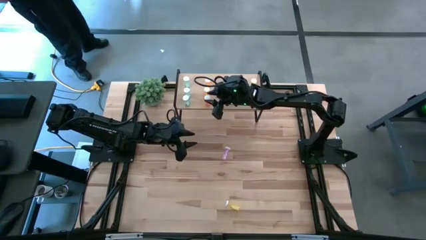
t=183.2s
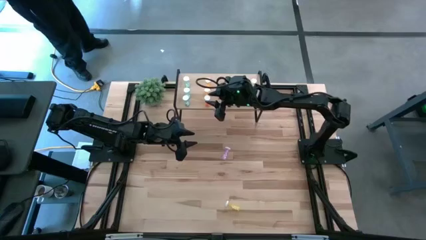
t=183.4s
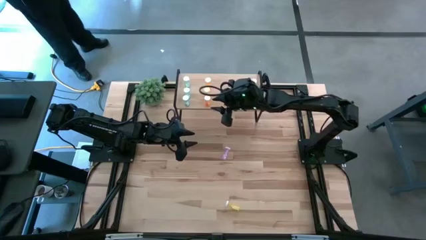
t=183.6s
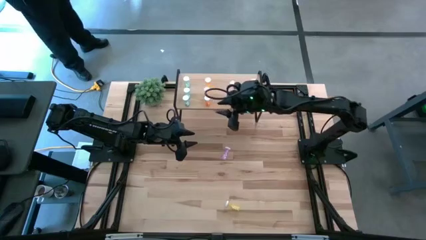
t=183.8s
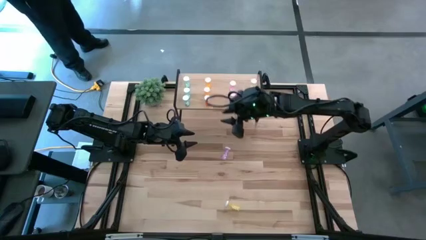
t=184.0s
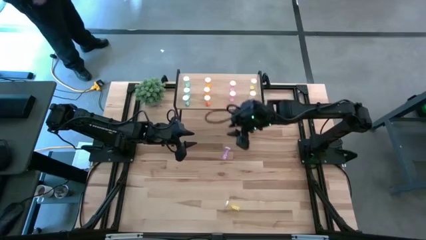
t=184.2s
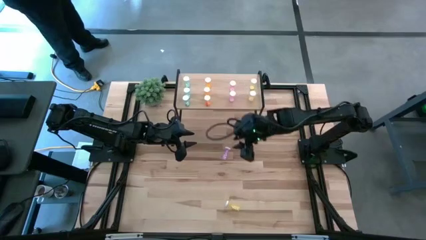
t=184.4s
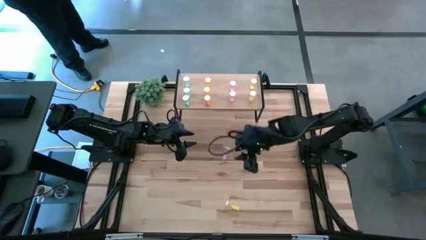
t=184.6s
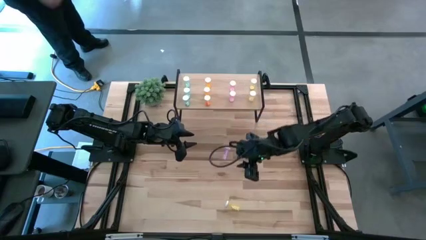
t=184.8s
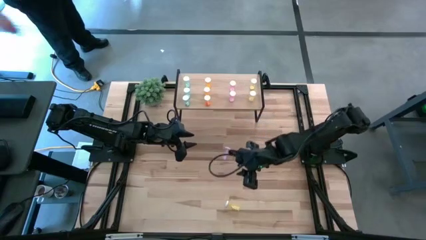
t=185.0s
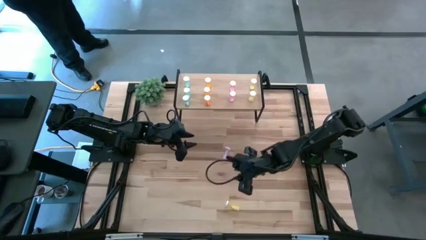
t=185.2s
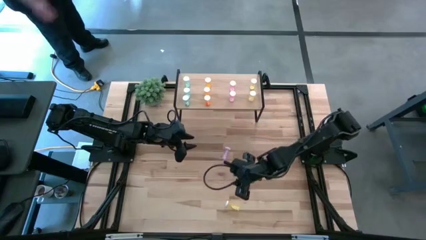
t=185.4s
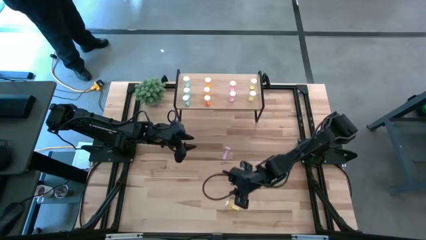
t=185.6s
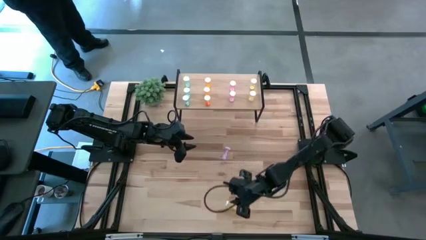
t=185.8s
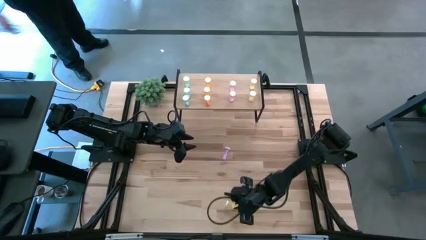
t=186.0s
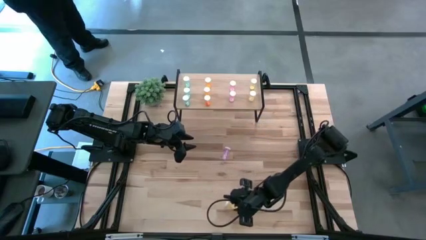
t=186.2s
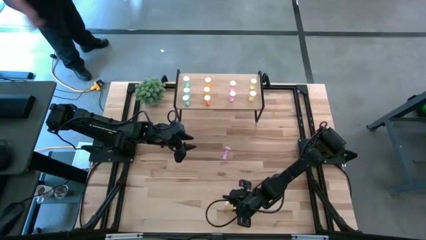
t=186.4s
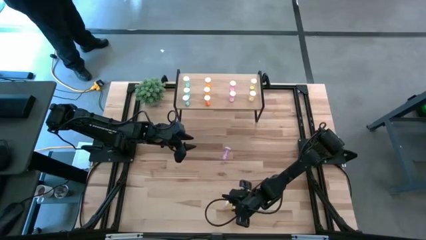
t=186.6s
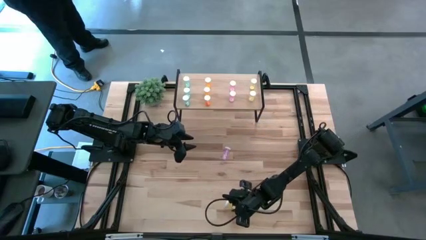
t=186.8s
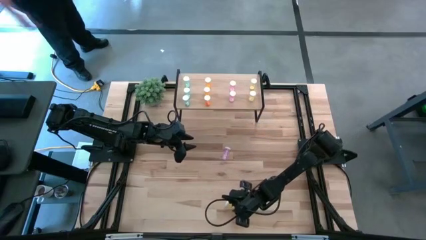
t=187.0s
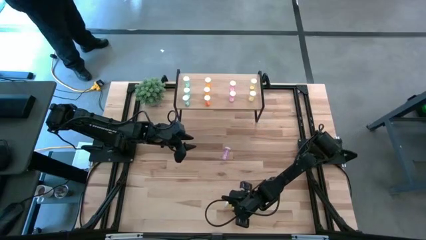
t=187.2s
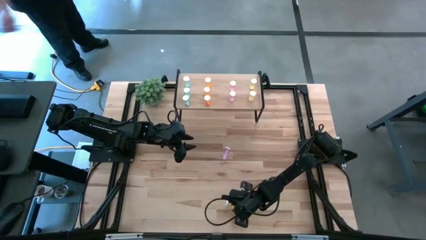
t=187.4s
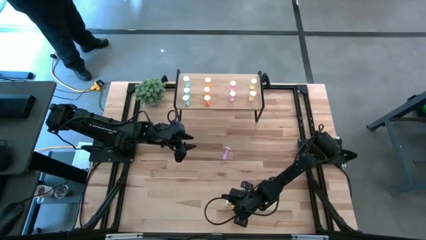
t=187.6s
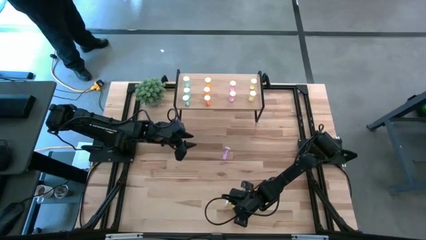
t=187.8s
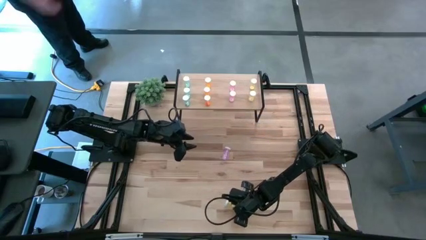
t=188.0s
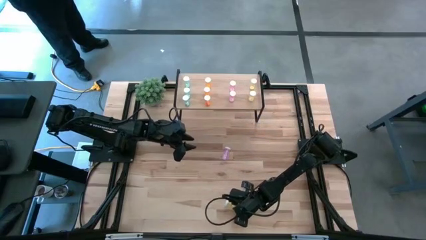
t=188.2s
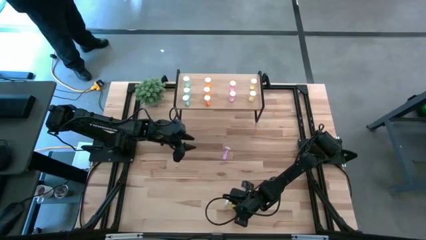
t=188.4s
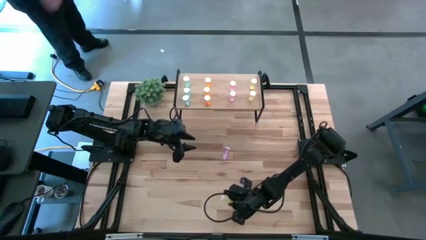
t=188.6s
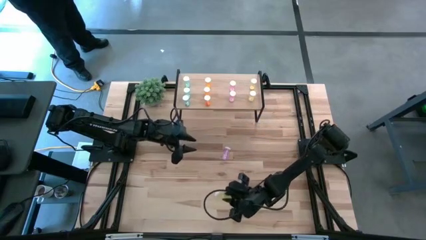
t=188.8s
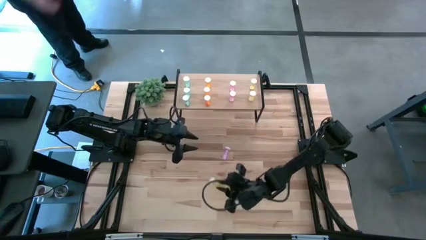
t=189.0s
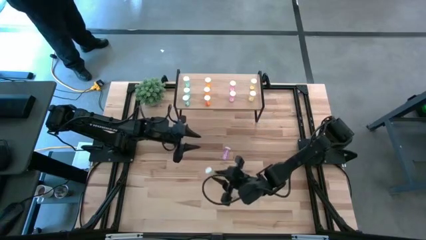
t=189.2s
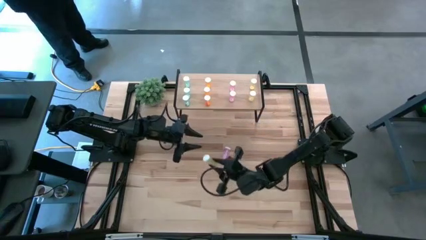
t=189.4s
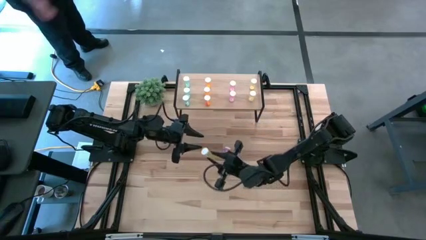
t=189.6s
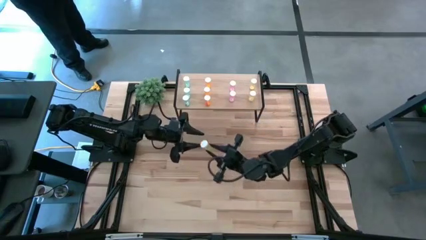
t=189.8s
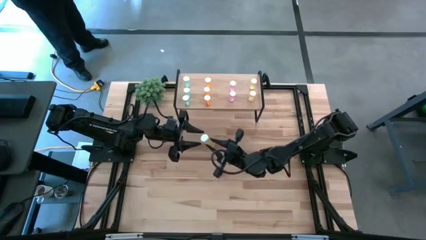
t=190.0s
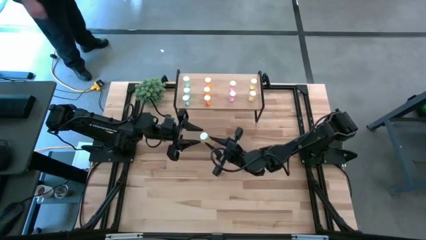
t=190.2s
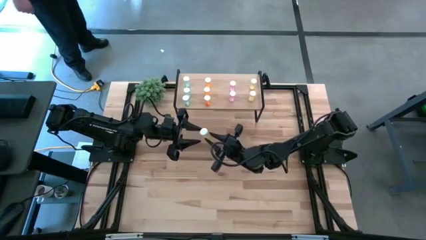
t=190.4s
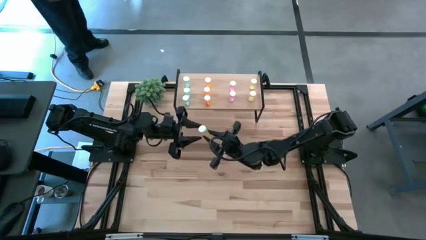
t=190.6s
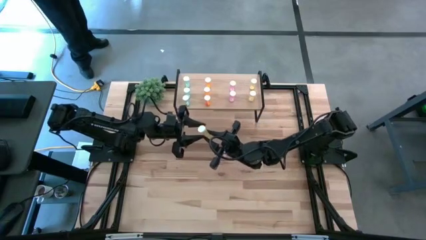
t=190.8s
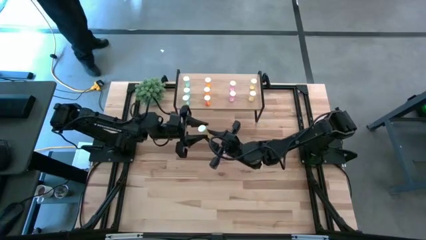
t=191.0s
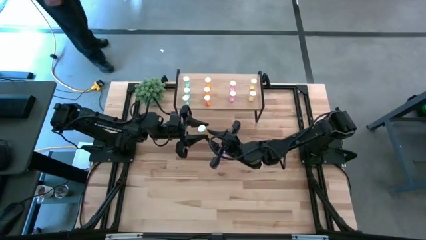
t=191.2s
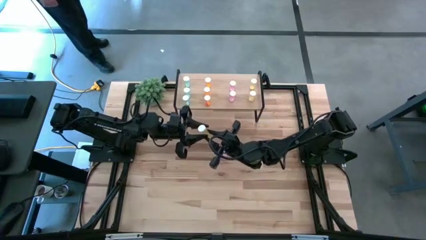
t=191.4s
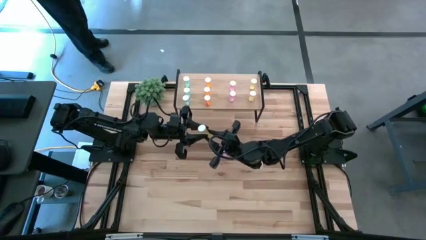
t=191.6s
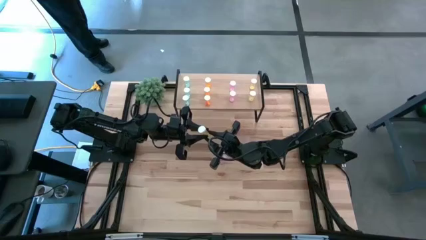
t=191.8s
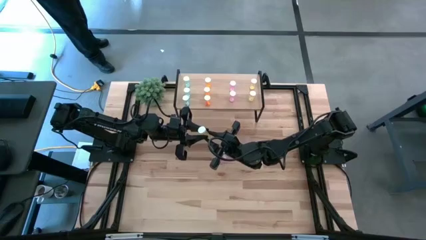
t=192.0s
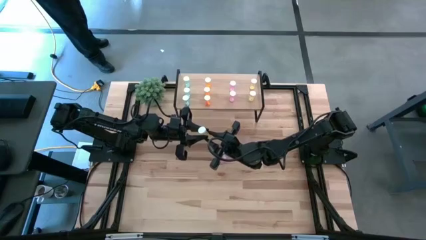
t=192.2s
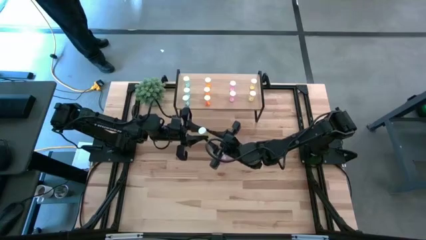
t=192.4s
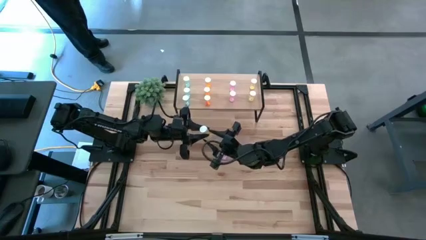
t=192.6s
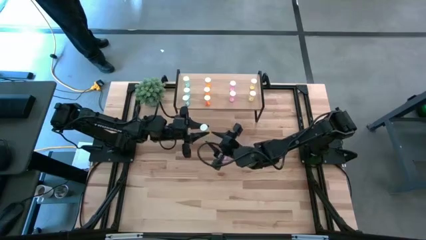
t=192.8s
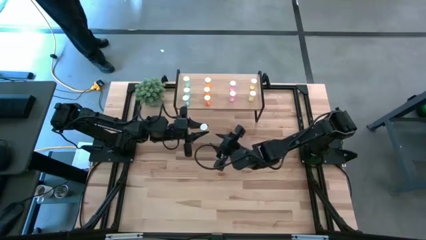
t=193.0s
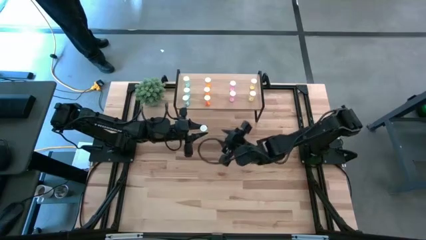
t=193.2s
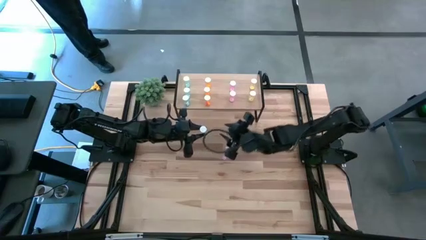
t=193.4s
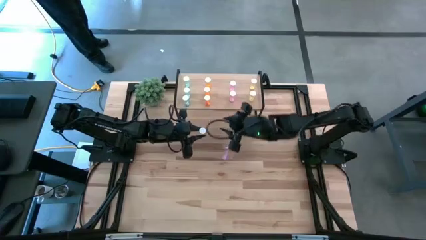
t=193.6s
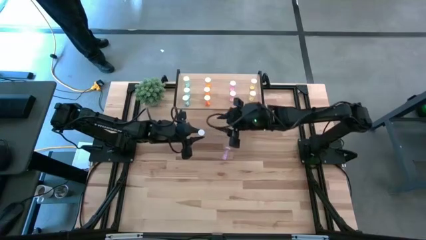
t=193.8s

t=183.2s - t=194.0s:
Task: Pick and place medicine bottles onto shelf by color
Put the yellow pill bottle on the shelf aligned with the yellow pill bottle

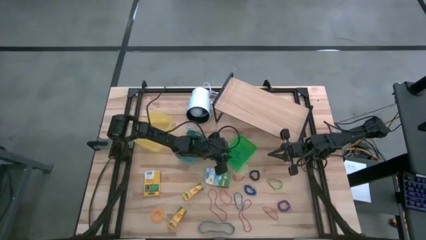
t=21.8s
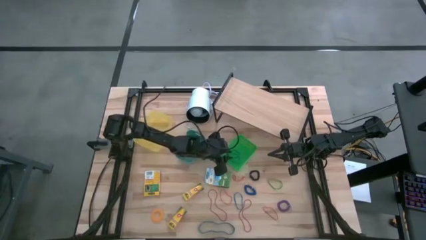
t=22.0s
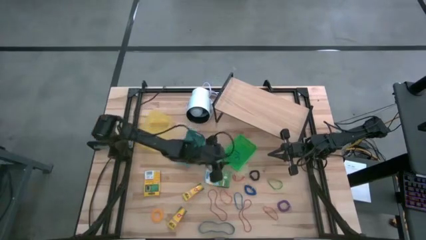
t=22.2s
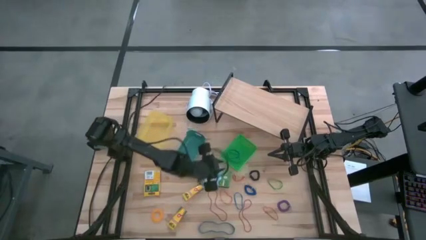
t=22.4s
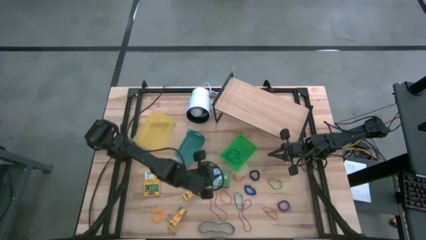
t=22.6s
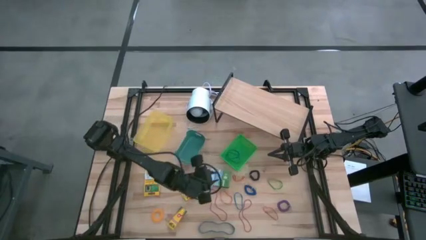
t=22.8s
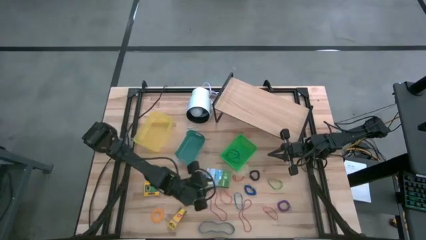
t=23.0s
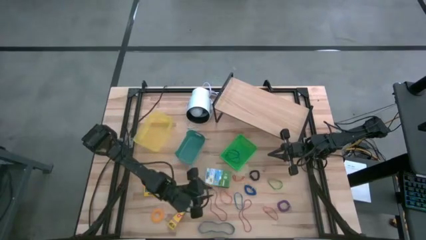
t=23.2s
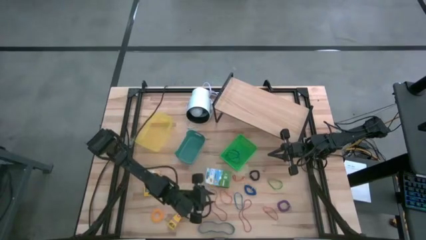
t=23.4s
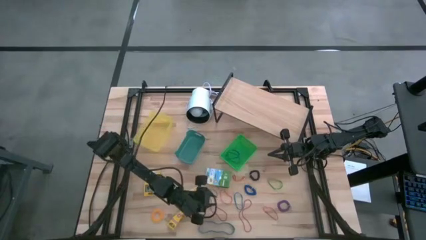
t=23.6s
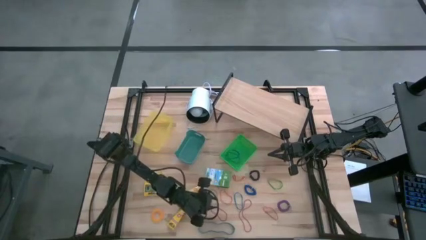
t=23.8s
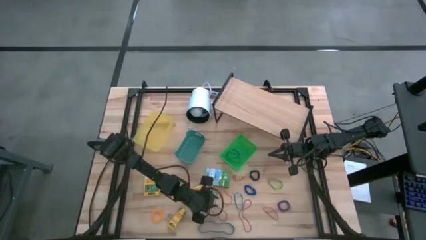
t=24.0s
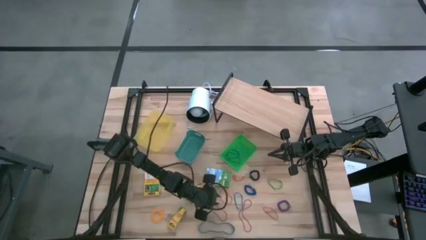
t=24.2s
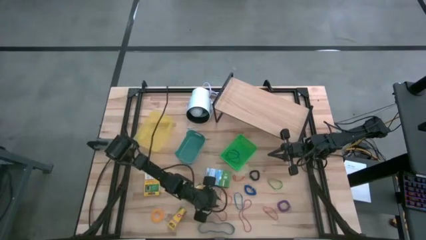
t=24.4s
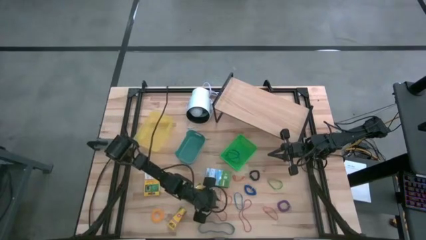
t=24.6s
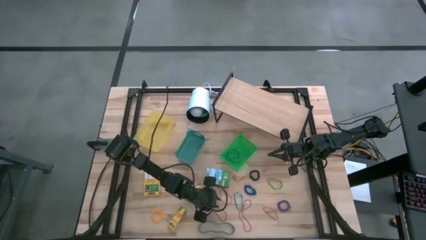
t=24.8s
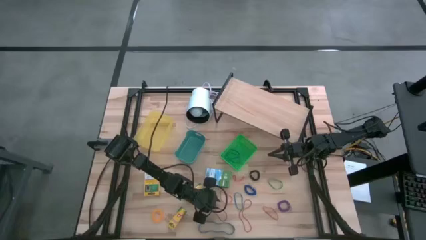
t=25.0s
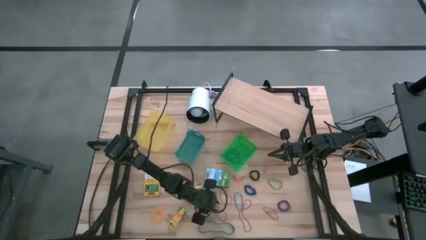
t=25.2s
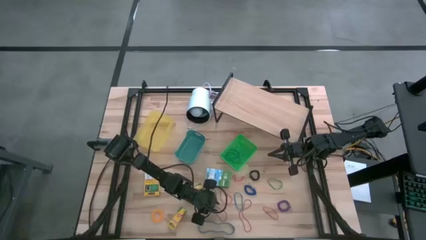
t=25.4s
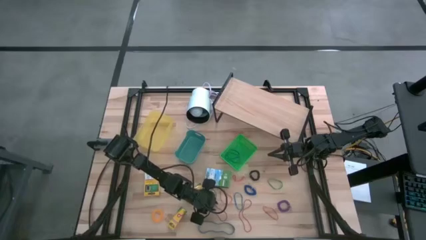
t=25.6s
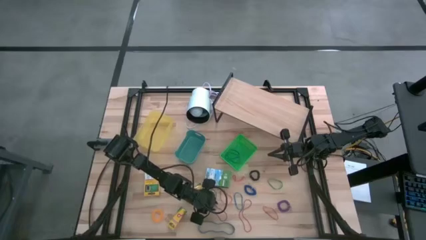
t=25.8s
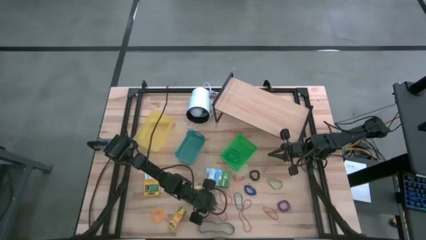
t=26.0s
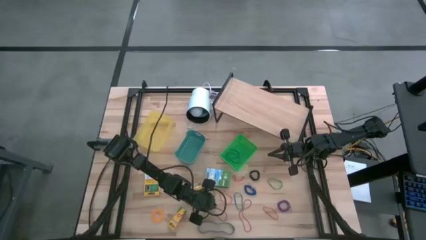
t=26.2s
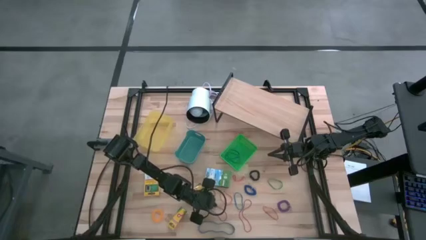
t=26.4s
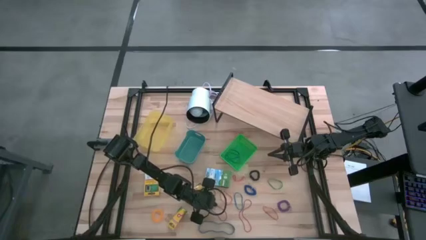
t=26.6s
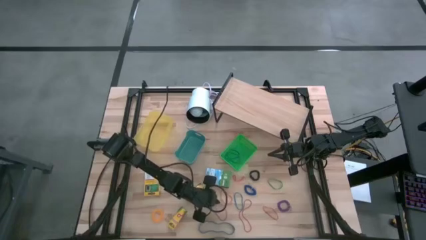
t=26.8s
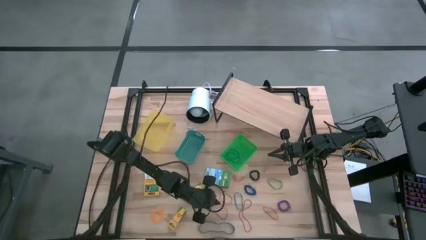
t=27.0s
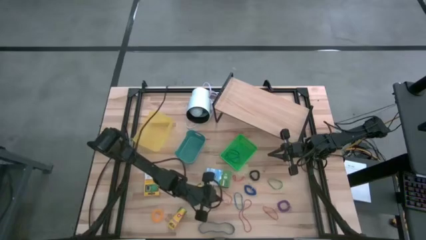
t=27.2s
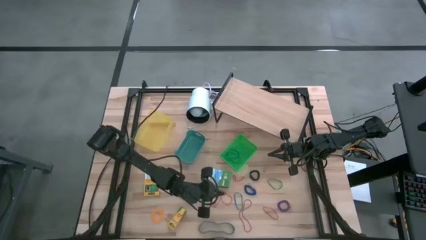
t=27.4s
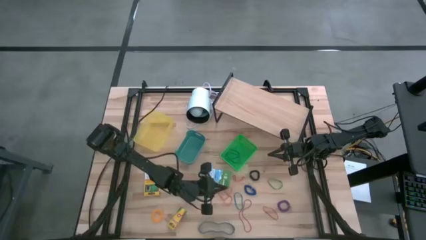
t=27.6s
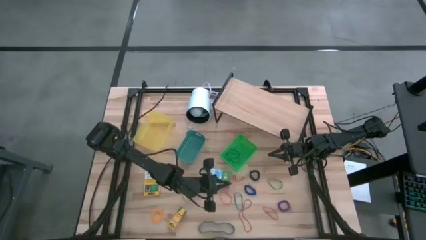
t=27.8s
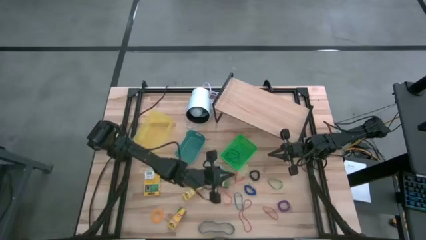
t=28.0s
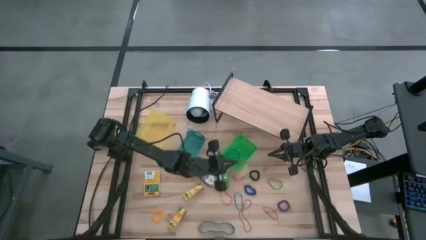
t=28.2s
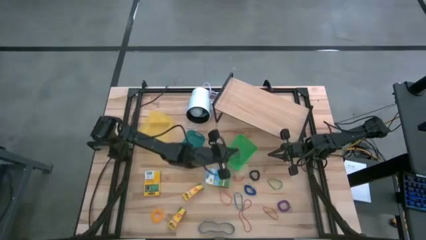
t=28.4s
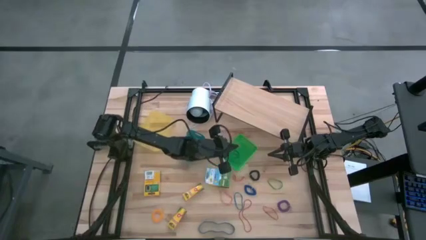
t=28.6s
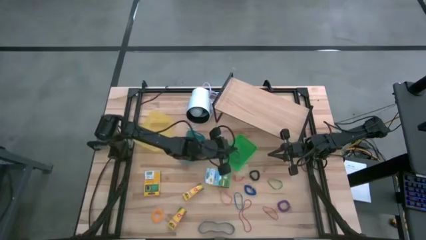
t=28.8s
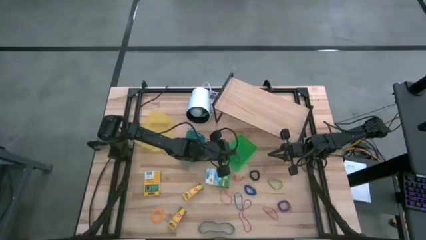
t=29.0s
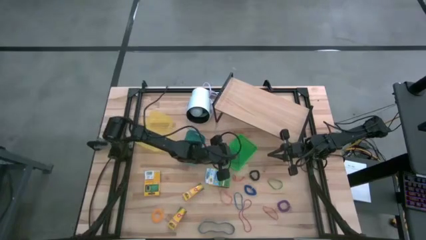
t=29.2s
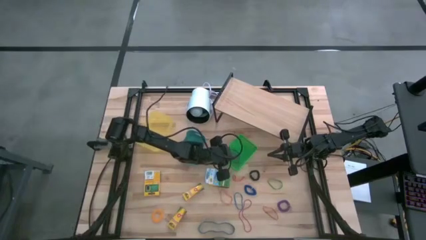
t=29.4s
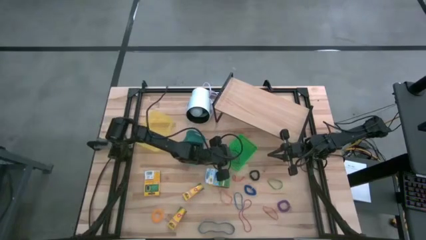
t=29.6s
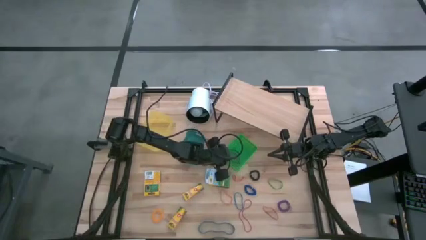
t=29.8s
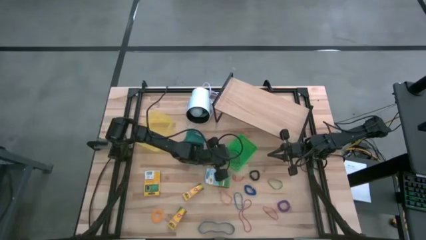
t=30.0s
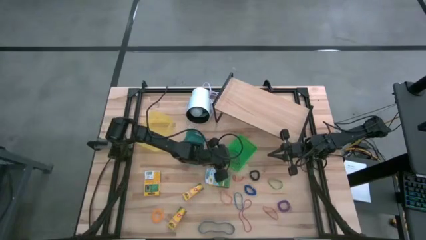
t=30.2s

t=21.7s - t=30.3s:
Task: Pick & Place Office Desk Supplies
Put the left red rubber band into the green bin
